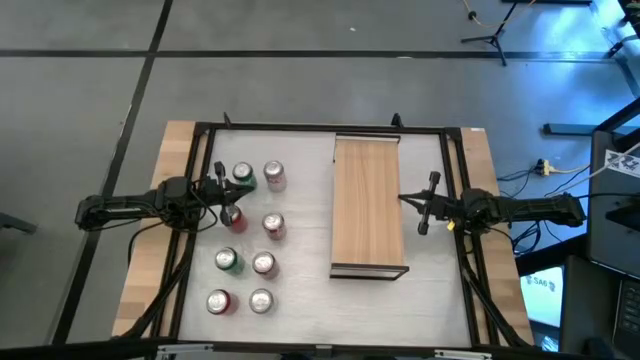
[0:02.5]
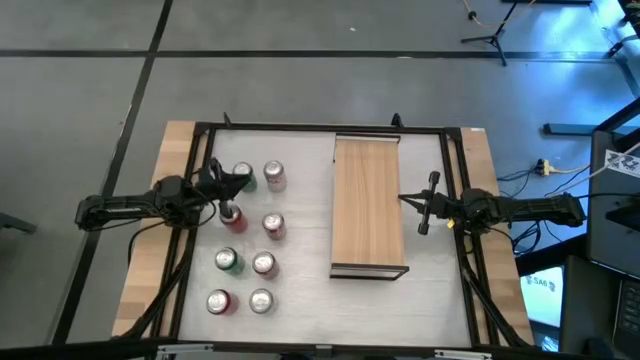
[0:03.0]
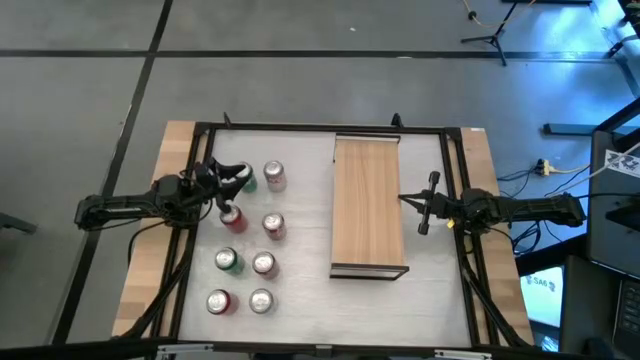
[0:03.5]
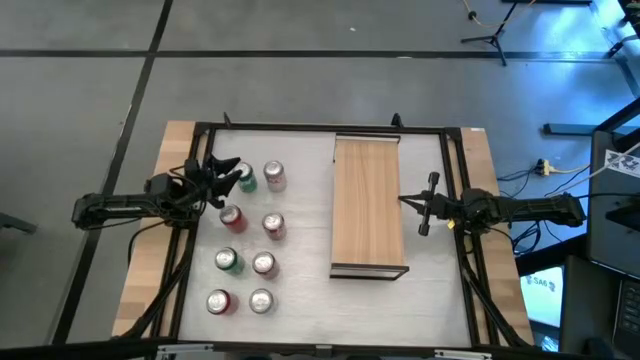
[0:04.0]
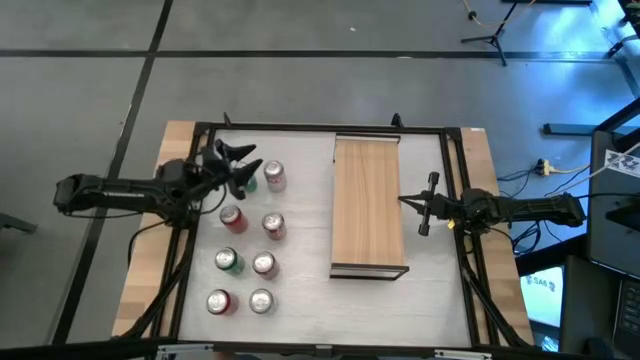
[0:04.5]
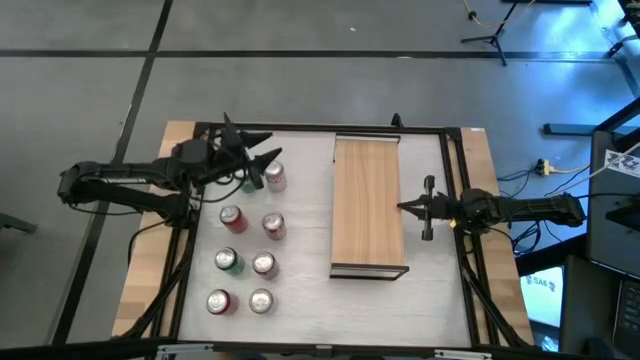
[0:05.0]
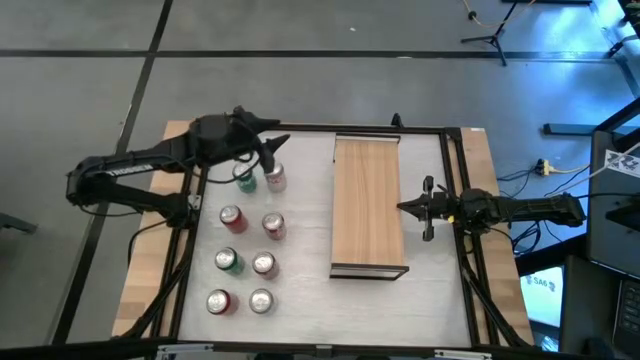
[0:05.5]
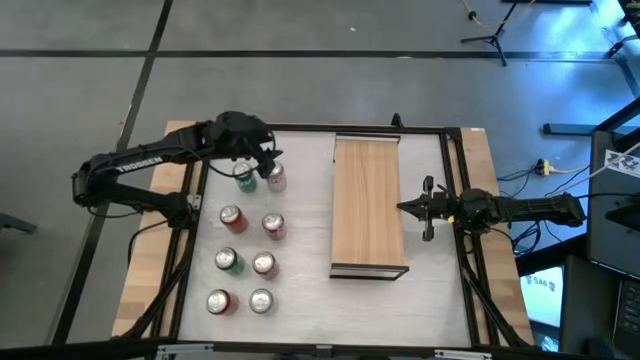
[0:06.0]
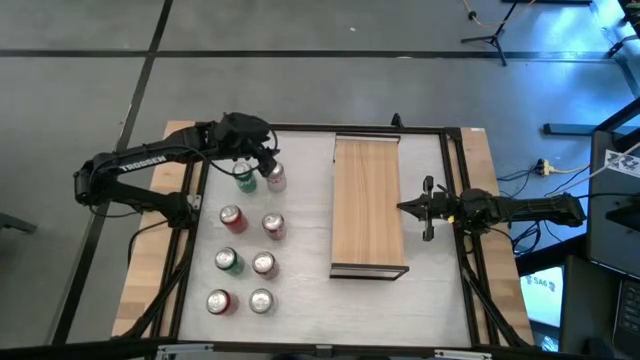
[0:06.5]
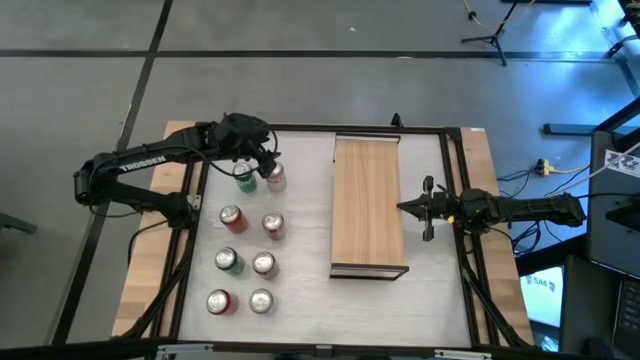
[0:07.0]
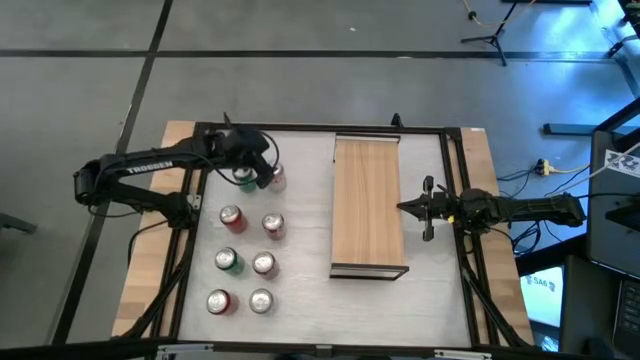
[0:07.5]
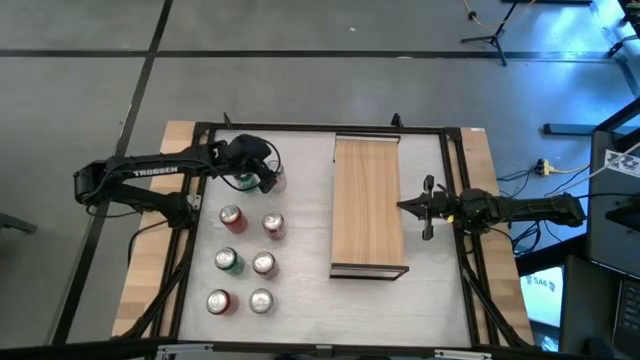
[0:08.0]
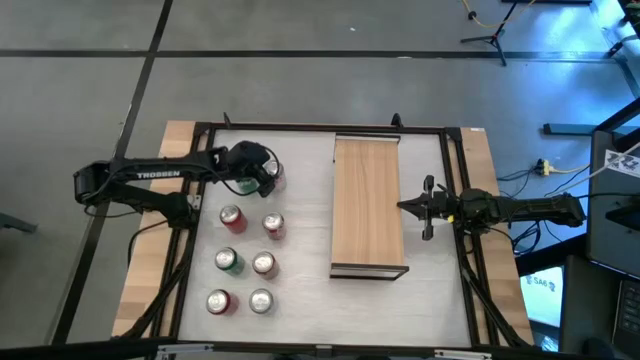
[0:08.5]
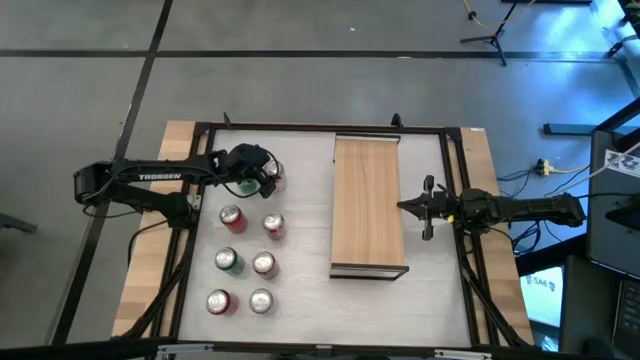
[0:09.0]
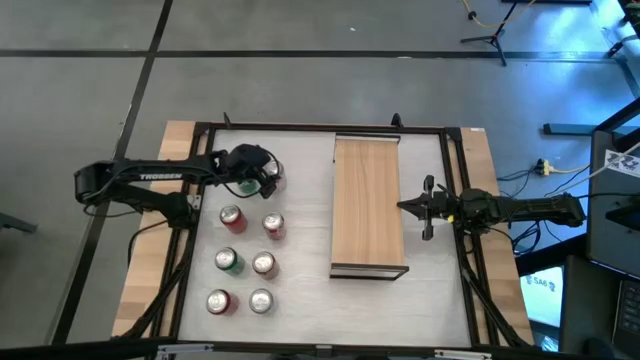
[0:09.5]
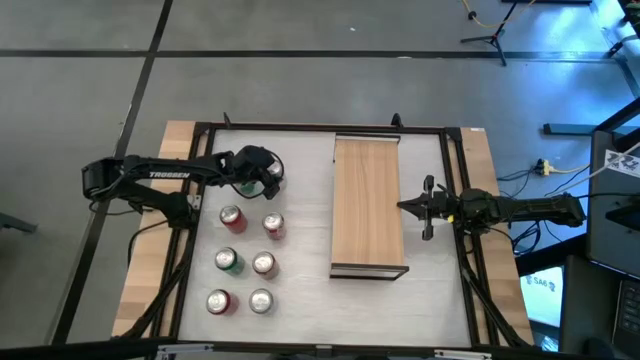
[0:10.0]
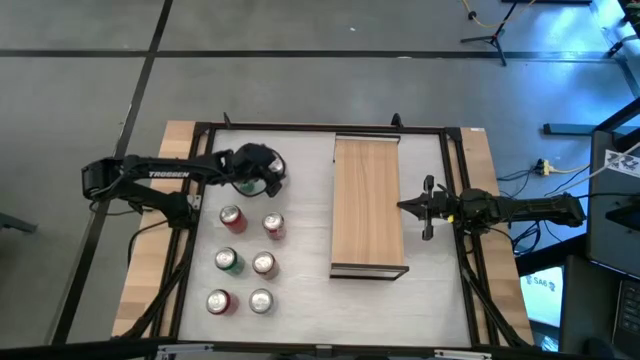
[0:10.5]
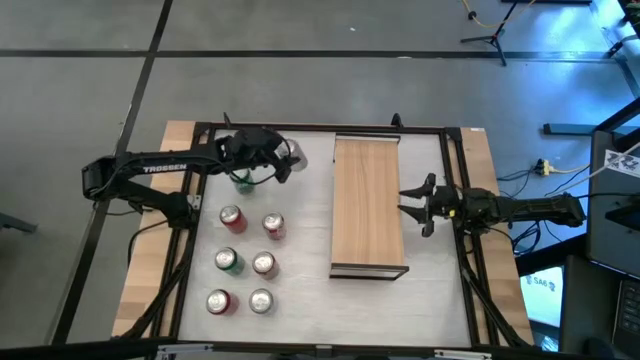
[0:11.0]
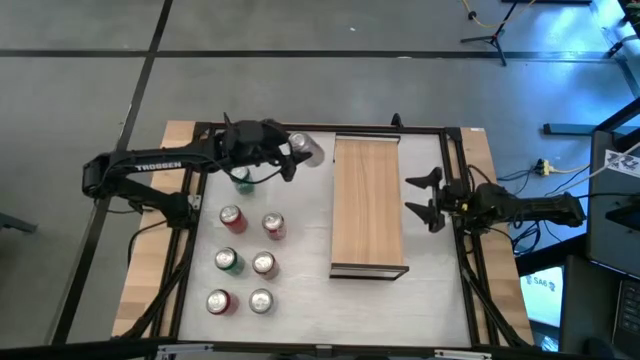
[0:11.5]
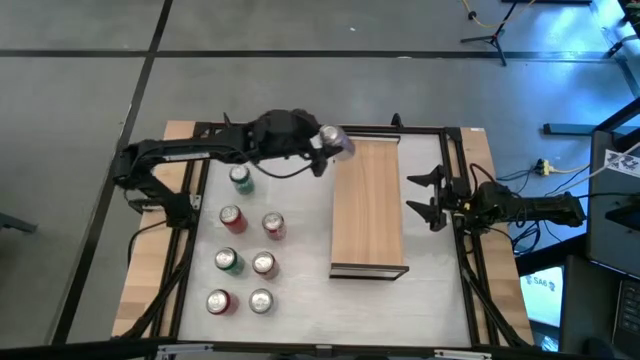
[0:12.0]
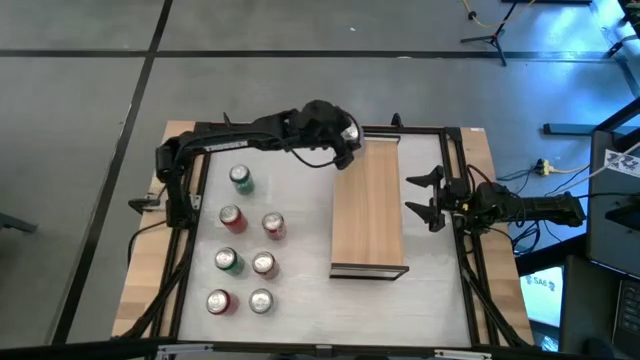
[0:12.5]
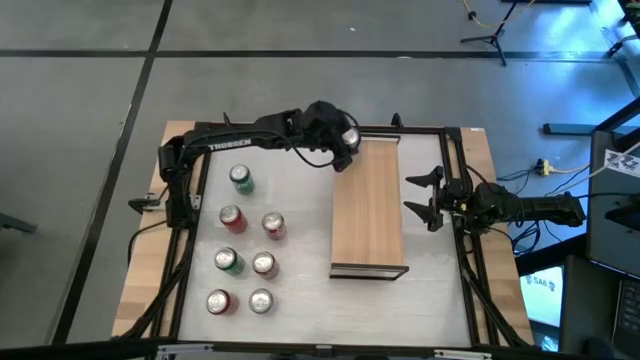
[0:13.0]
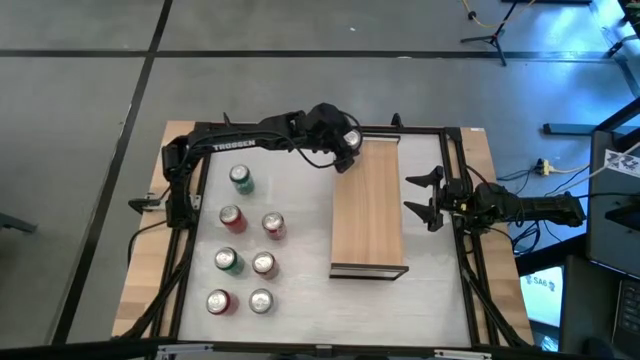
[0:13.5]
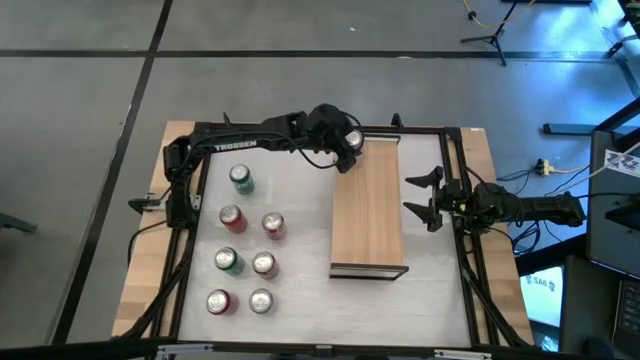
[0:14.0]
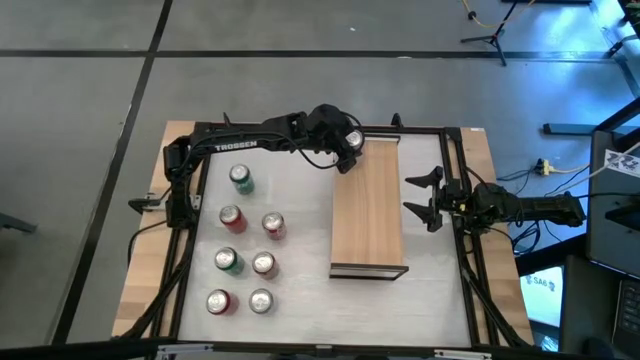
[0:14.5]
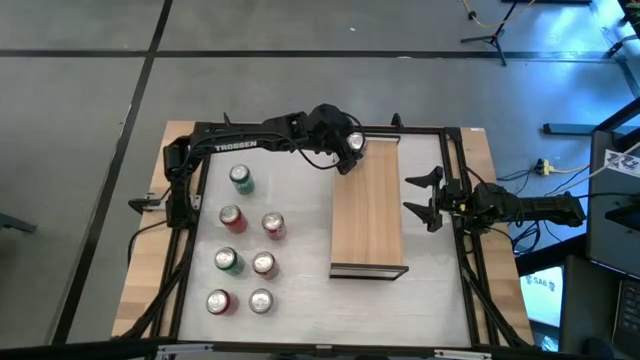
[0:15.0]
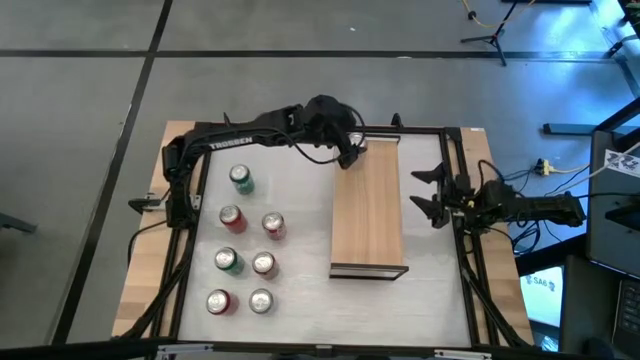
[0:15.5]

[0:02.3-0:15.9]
Task: Place canned beverage on shelf
Put the top silver soda can on the shelf

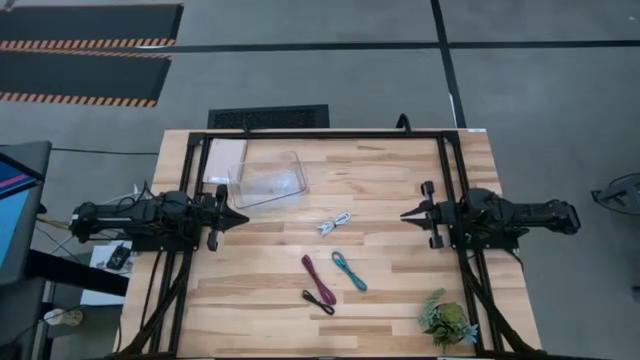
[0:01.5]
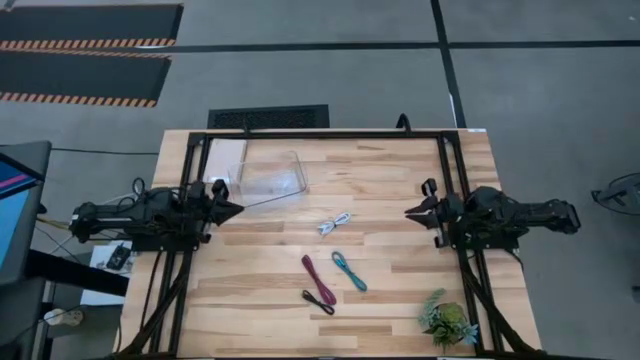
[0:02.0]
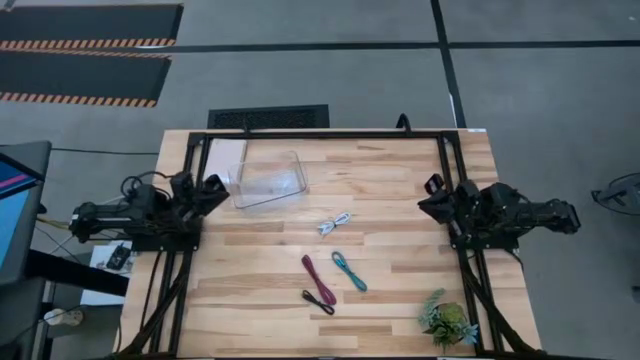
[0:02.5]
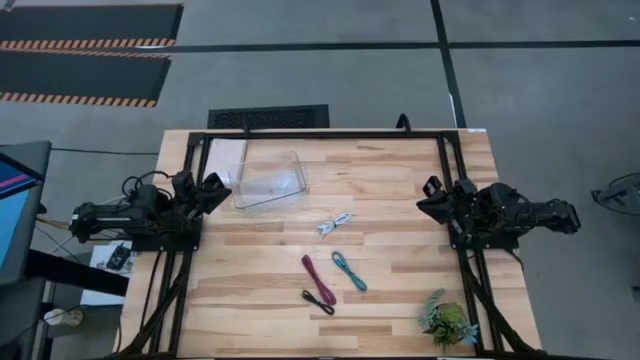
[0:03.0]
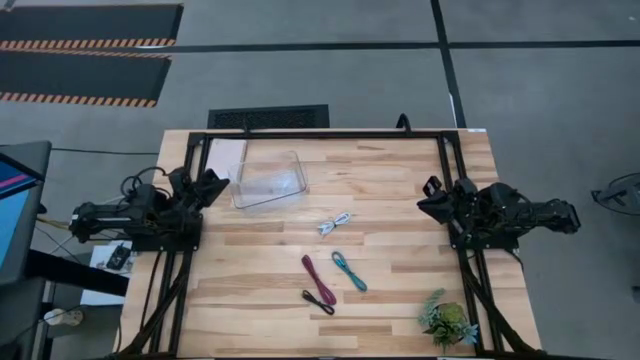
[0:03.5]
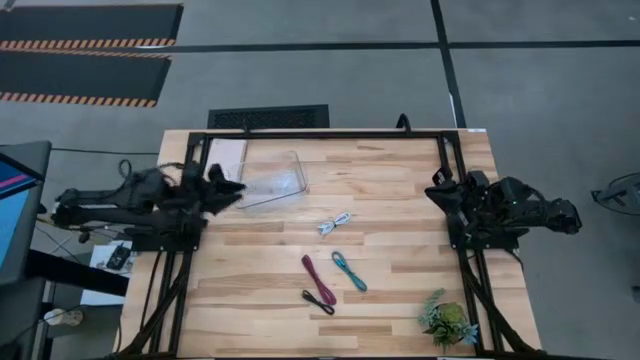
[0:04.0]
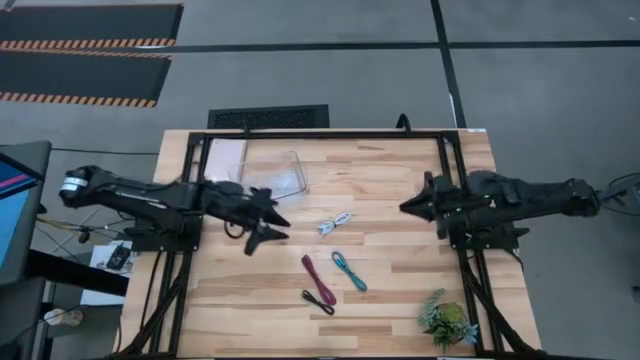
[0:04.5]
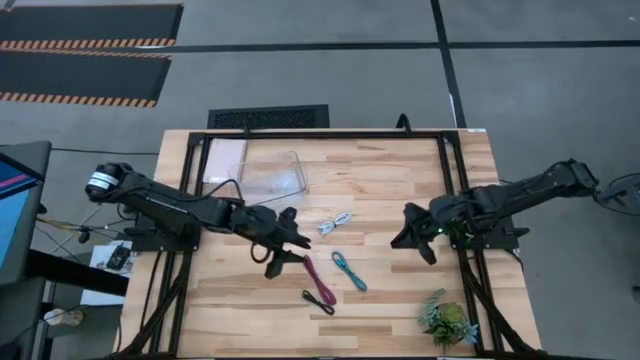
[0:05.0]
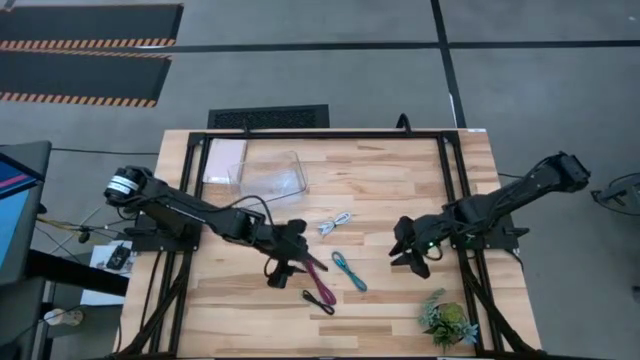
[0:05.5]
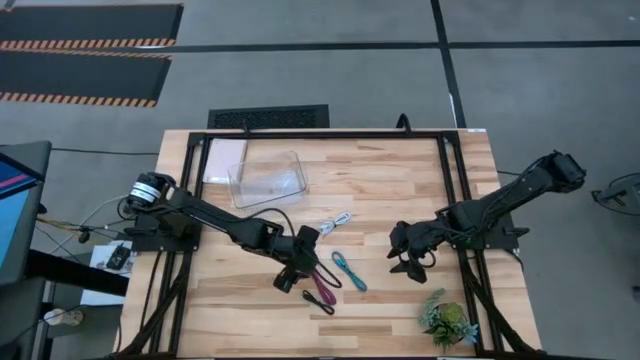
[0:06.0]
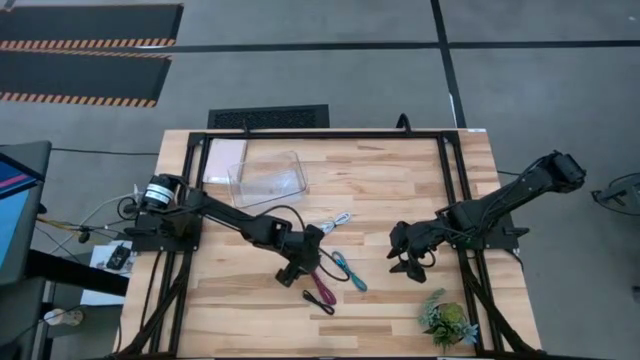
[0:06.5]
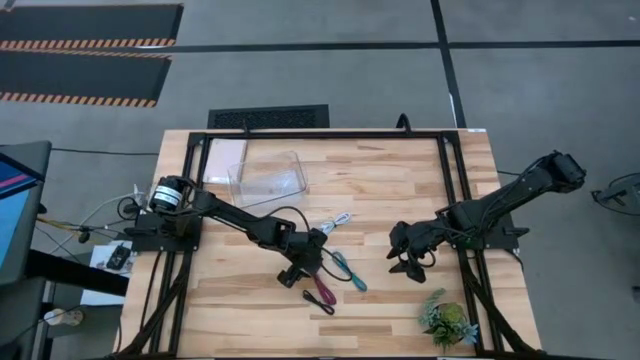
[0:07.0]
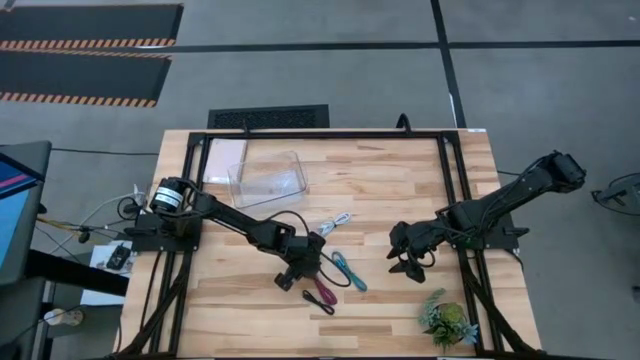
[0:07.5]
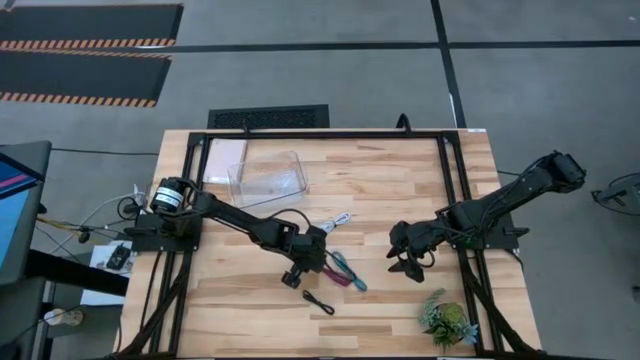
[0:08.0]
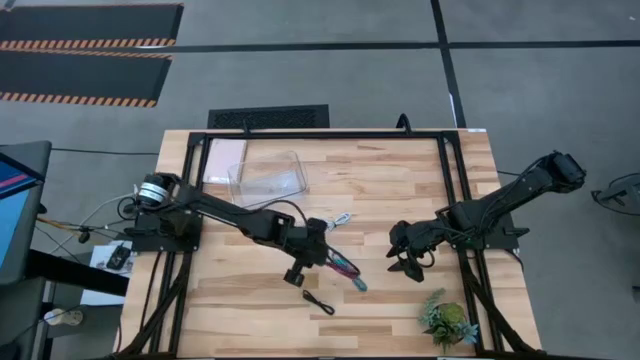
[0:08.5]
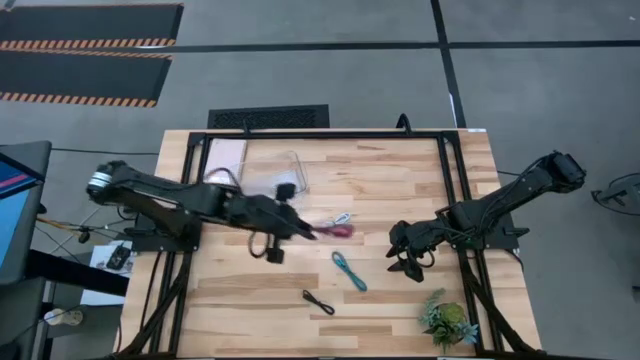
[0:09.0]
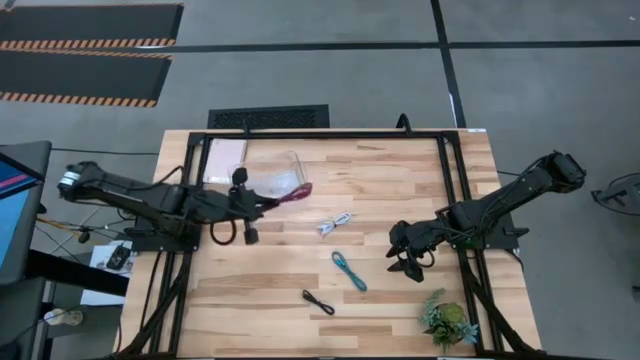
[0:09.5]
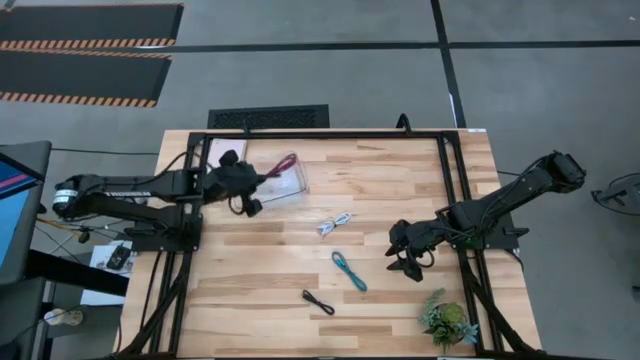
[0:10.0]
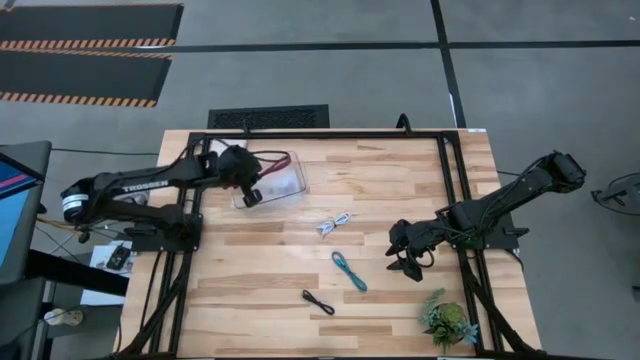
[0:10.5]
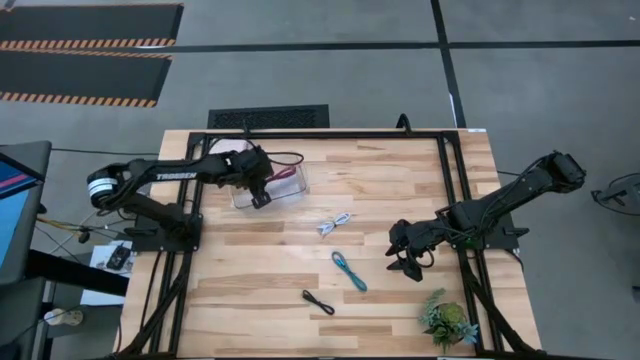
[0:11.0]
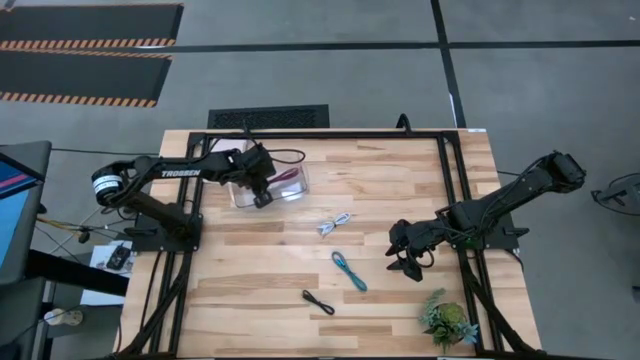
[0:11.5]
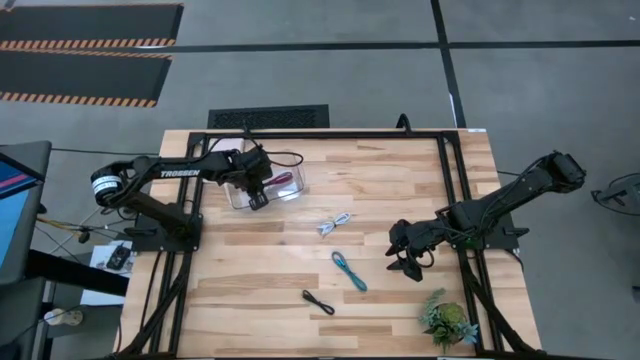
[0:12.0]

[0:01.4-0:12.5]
Task: Pick and place USB-C Cables
Put the red usb cable into the transparent bin
